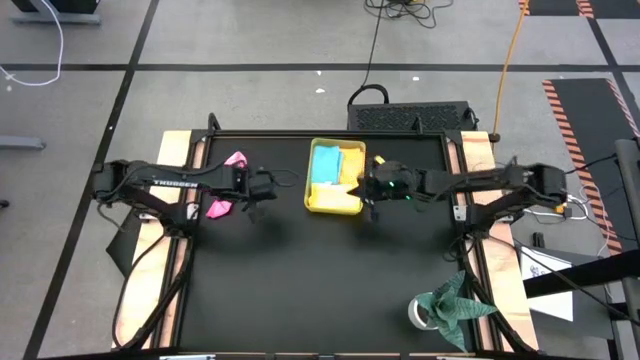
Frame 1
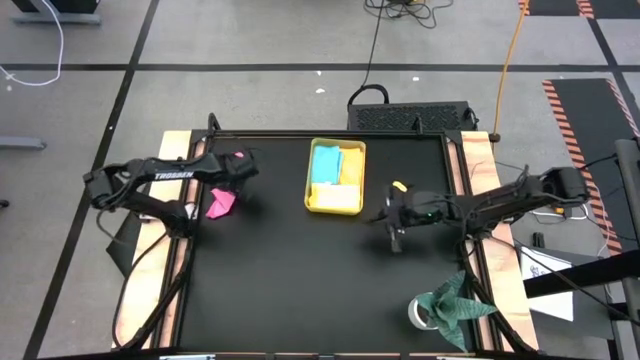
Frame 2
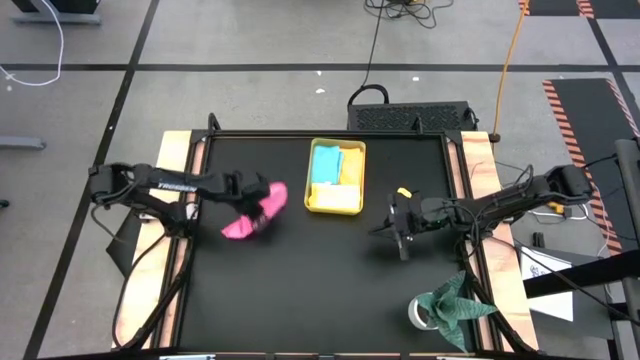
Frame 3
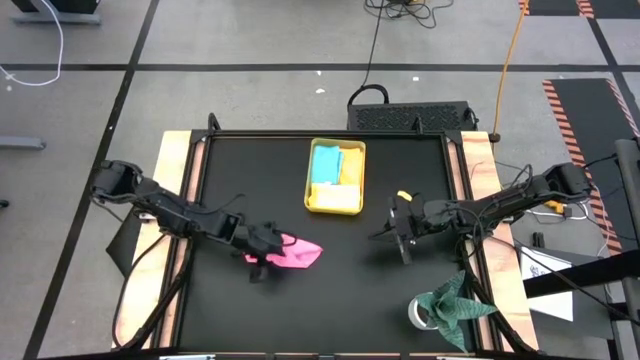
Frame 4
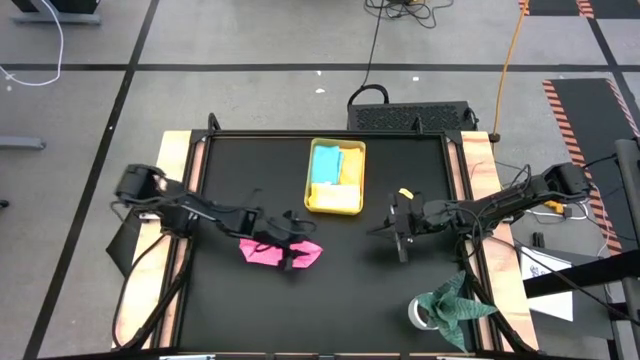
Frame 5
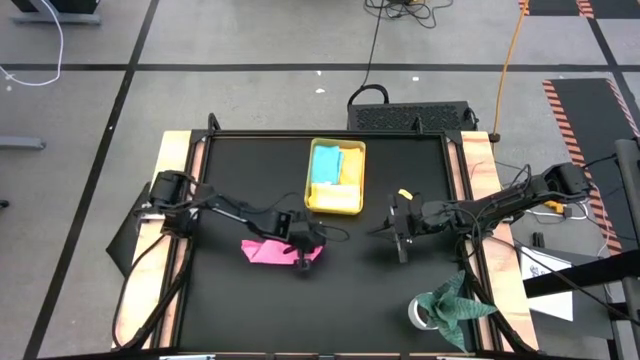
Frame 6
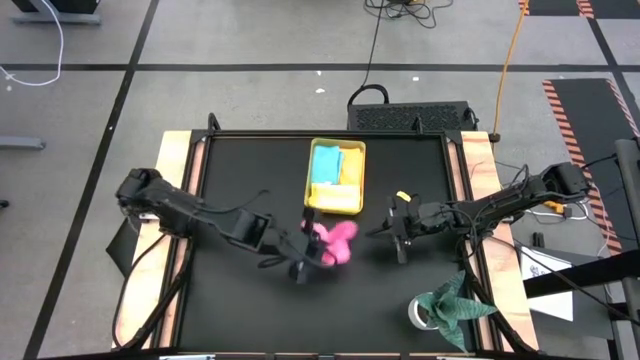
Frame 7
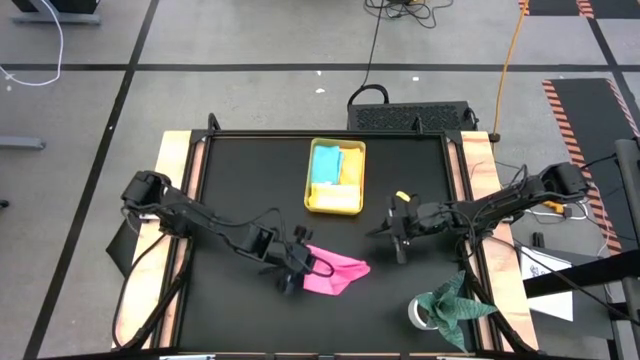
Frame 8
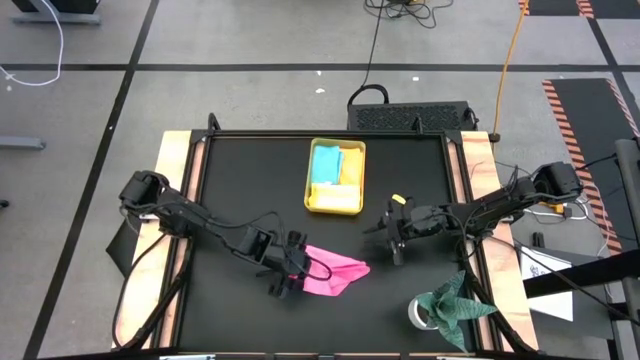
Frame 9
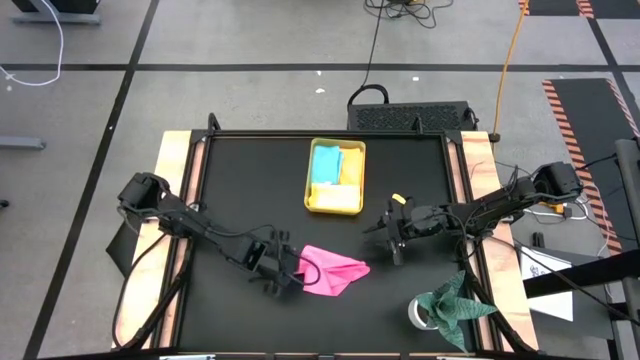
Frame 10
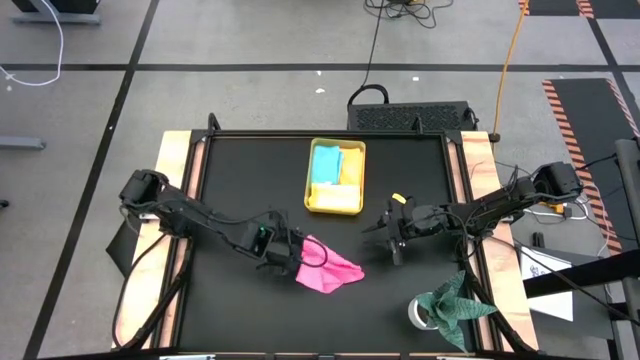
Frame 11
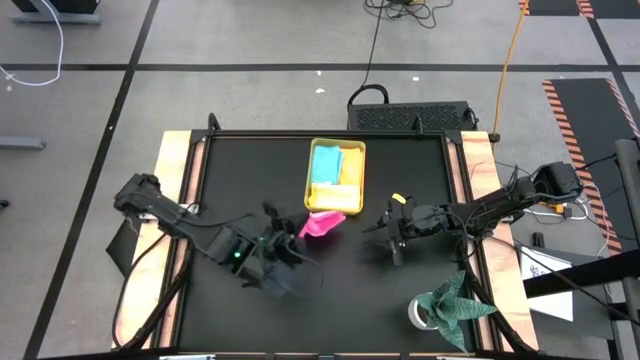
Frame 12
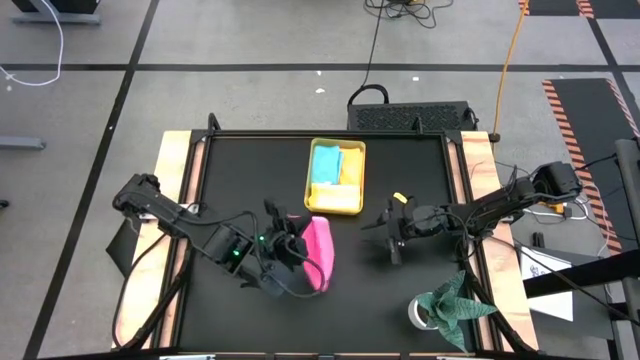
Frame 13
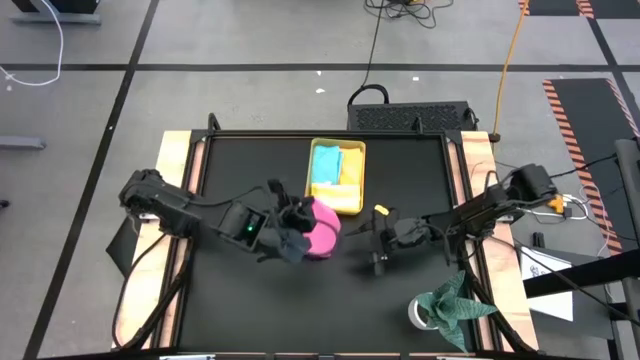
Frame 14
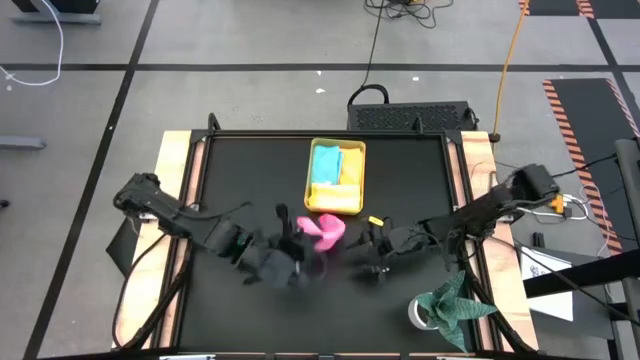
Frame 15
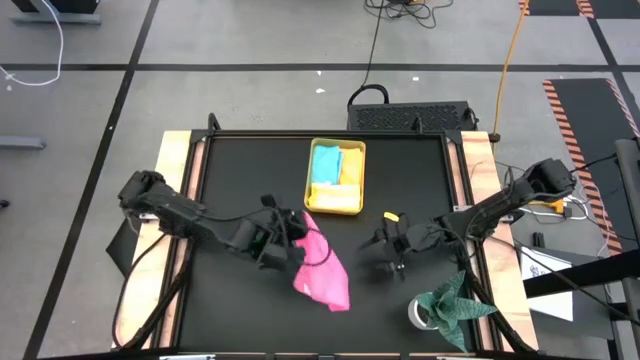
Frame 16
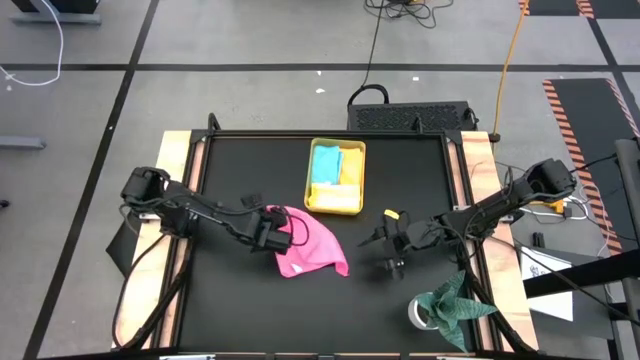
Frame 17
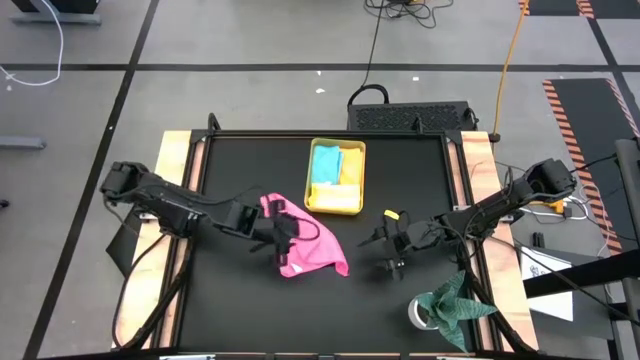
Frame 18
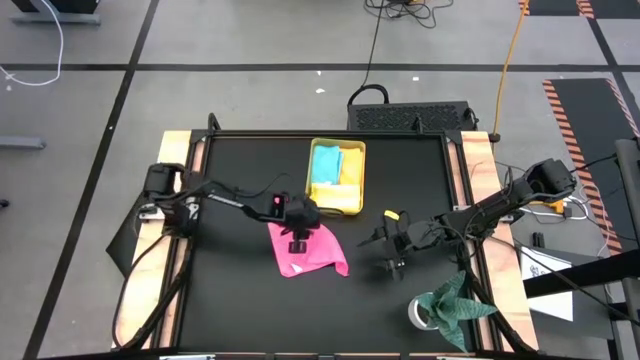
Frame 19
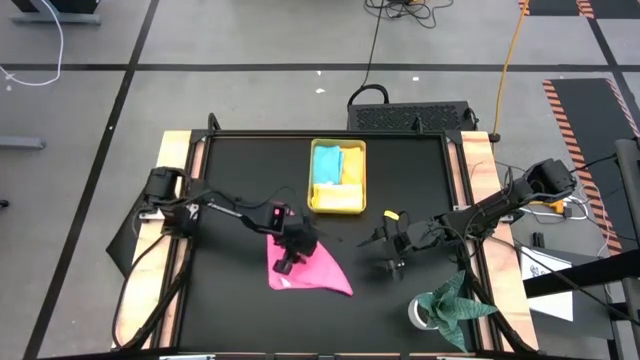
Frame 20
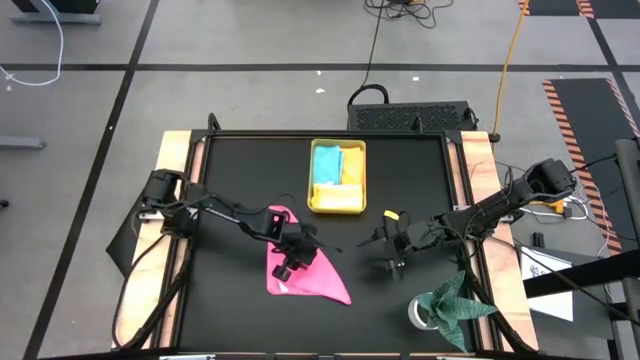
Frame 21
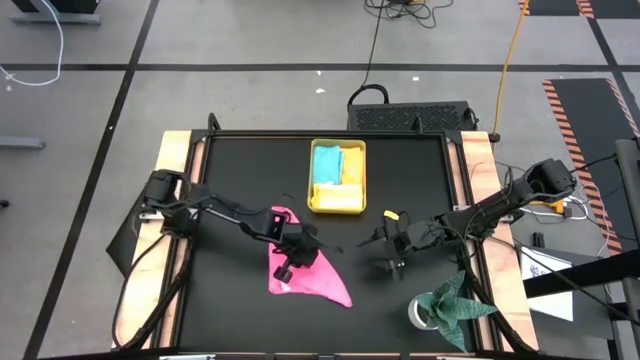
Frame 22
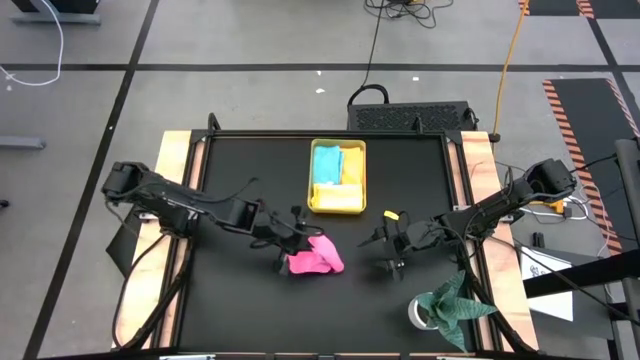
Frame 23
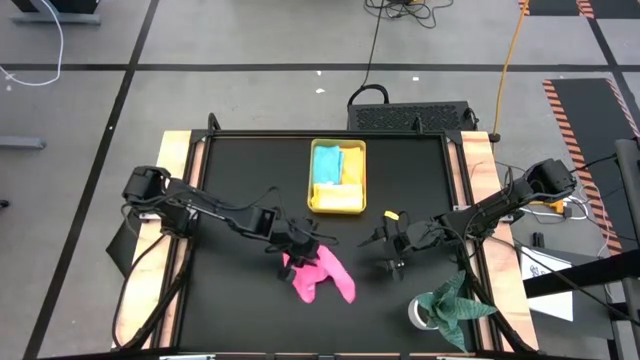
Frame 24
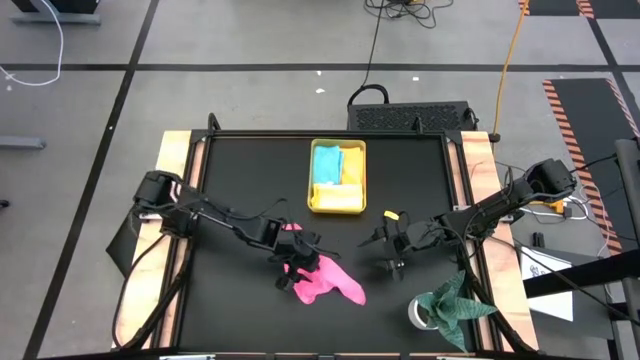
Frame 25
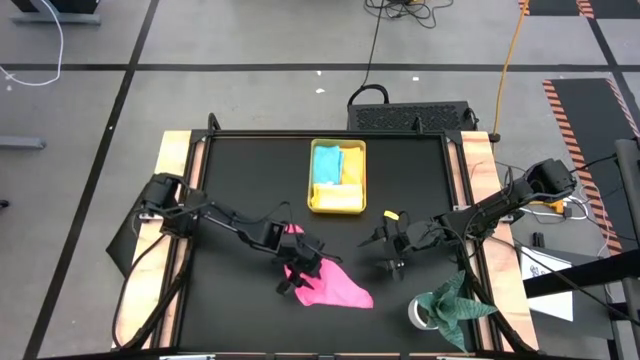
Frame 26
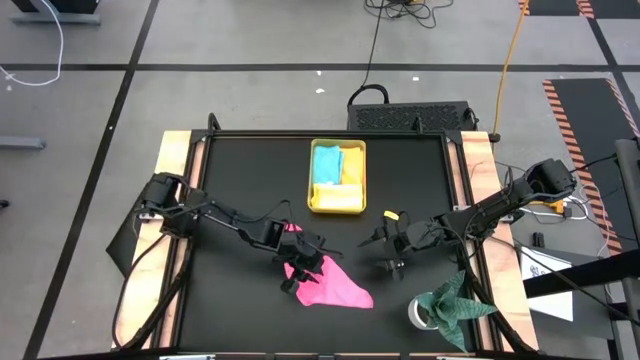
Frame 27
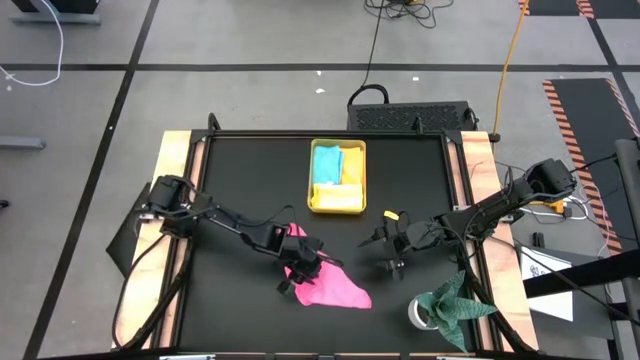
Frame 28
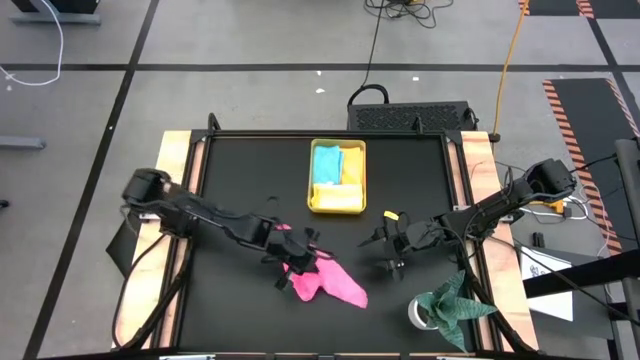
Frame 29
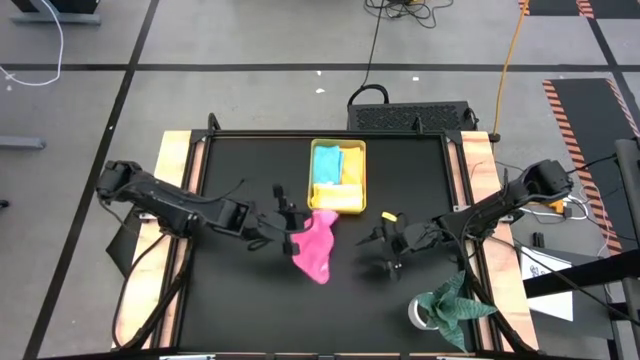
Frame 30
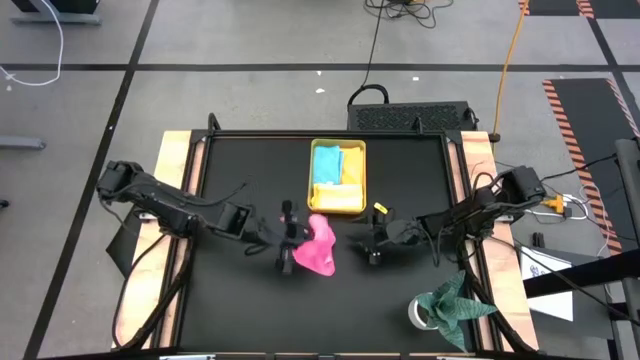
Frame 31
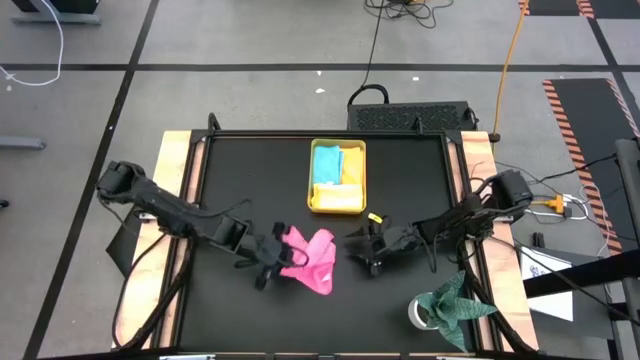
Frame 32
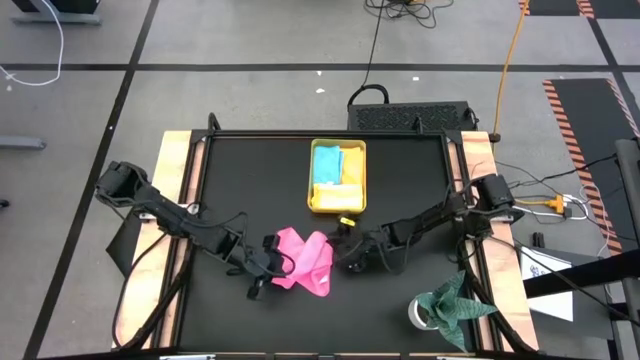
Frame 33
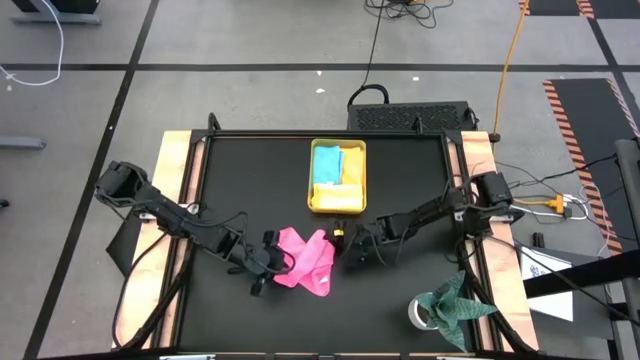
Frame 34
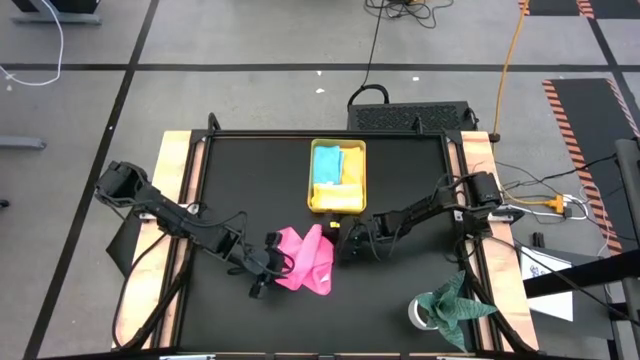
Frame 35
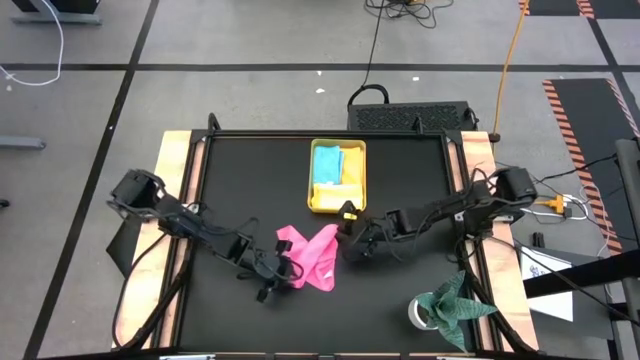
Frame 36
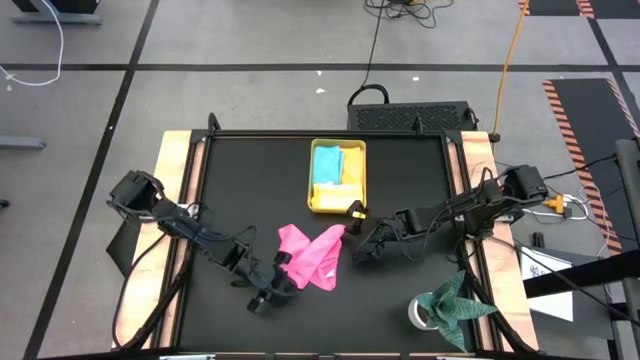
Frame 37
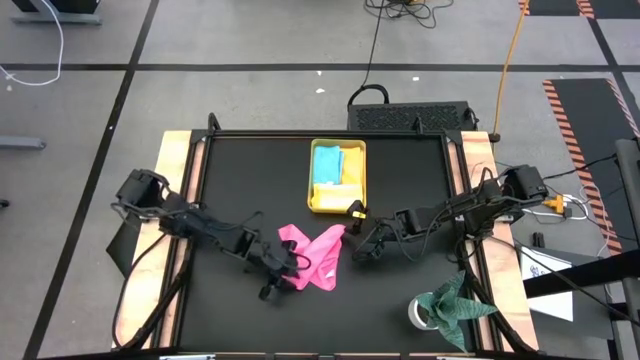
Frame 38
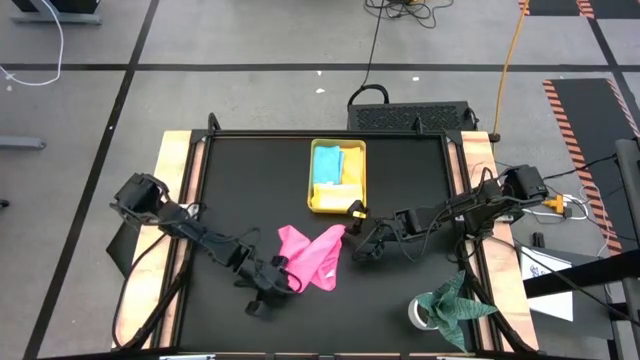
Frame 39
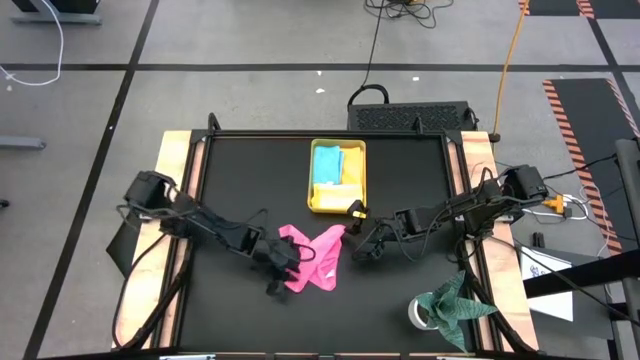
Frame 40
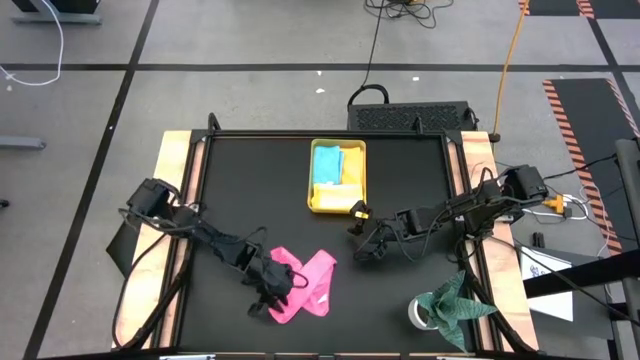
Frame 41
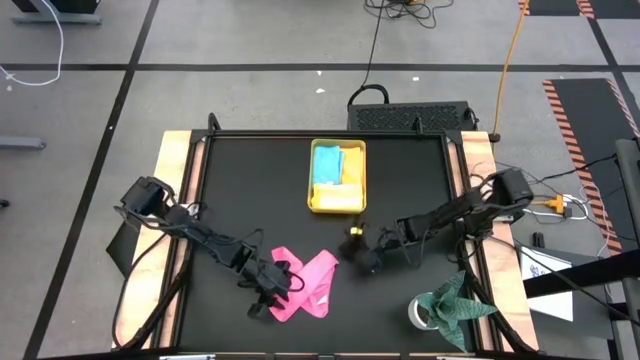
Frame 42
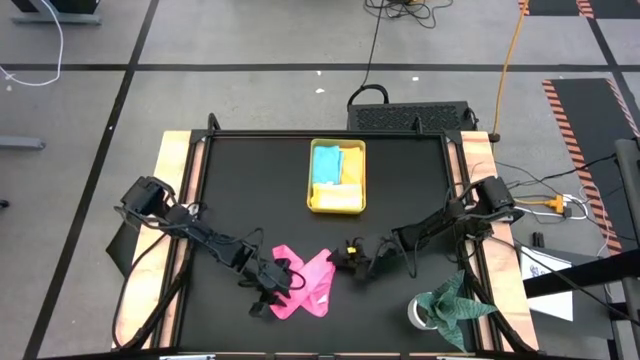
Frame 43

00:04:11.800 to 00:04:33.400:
Task: Fold microfiber towels
Fold the pink towel
